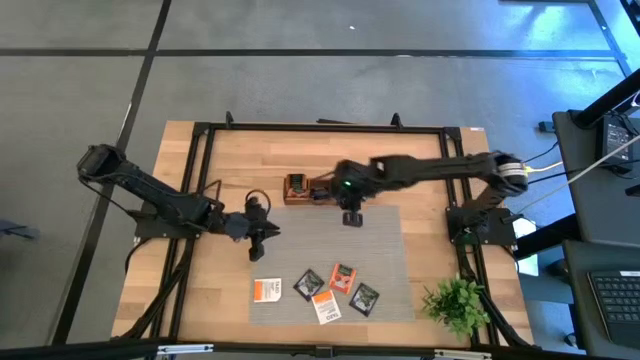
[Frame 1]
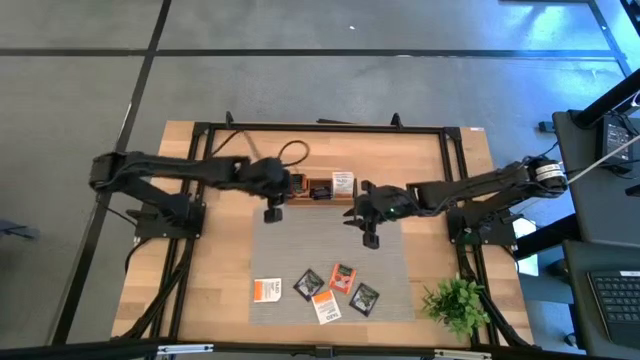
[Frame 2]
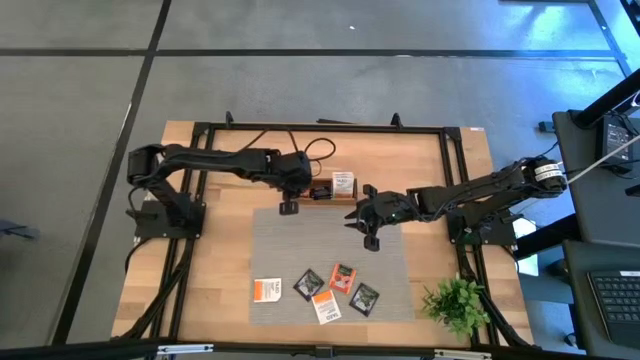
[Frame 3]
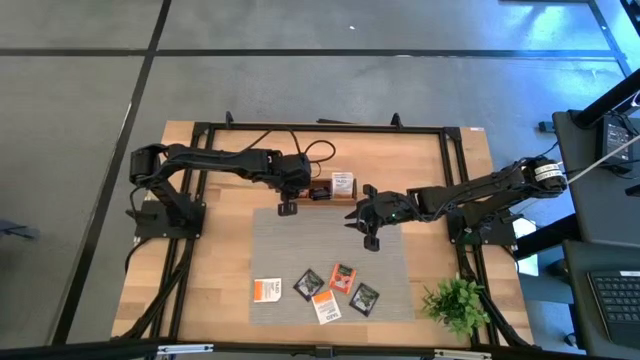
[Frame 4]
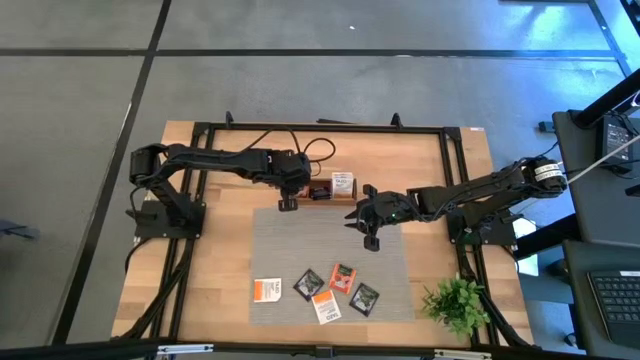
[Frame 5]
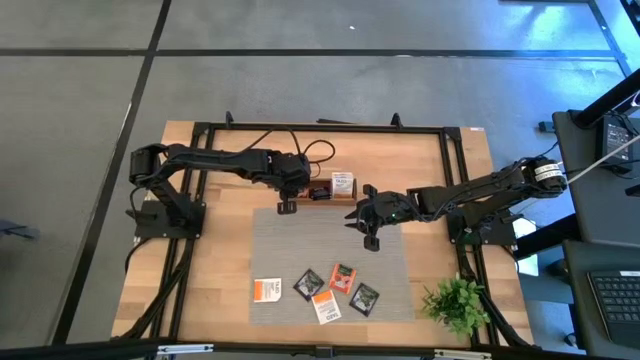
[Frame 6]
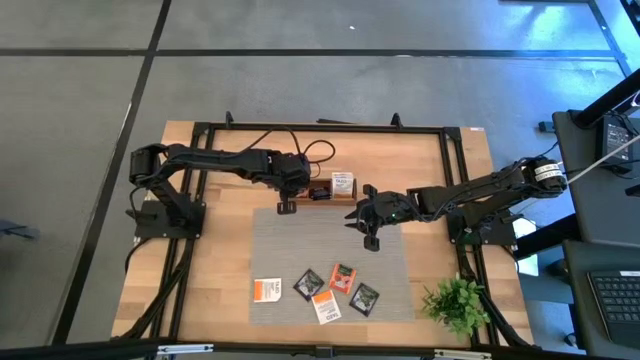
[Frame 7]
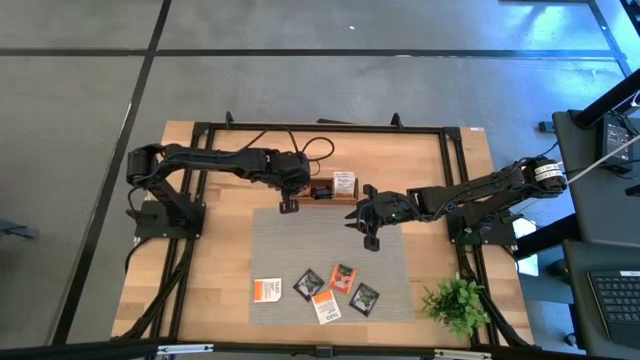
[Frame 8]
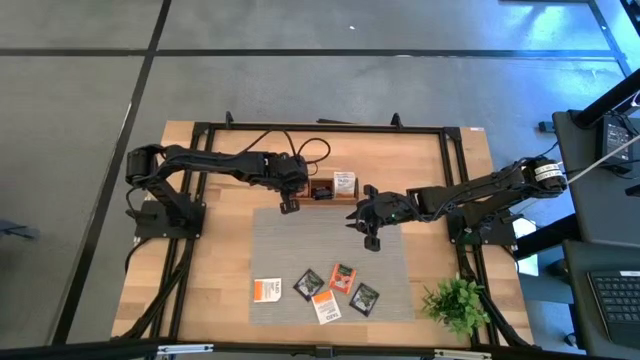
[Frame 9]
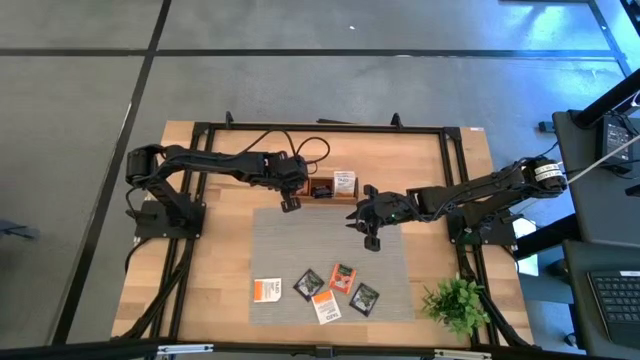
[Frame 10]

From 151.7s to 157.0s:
Task: Pick & Place Tea
Adjust the orange tea bag in the wooden organizer

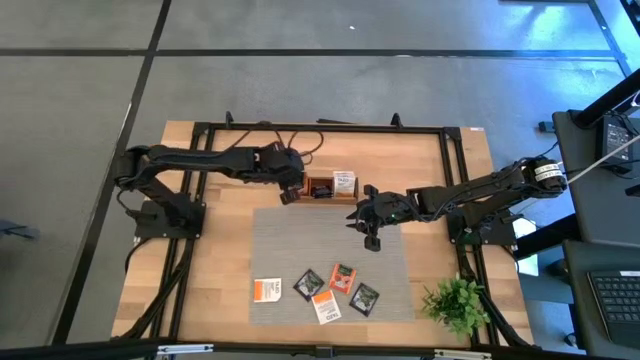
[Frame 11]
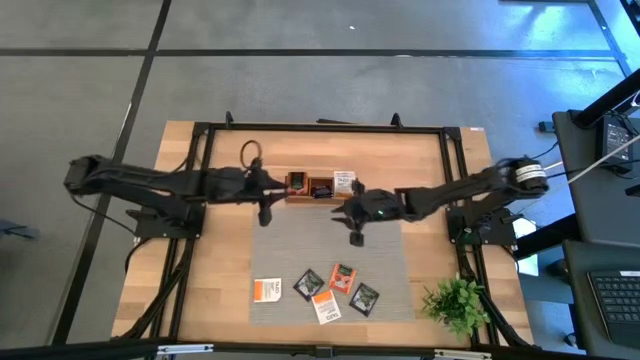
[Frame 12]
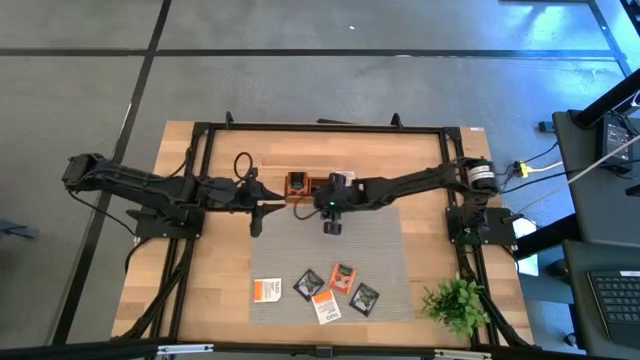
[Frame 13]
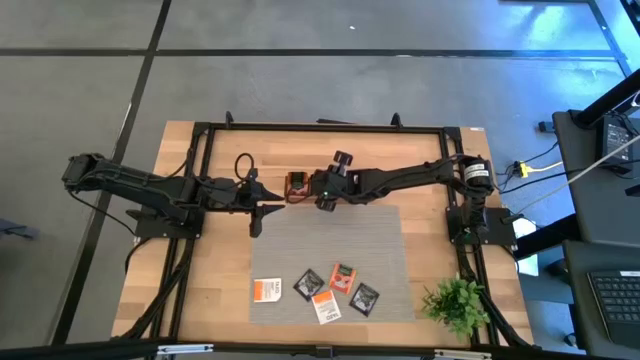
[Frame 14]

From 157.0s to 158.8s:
Adjust the purple tea bags in the wooden organizer

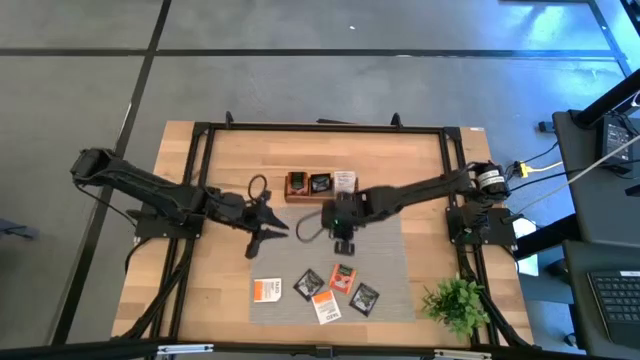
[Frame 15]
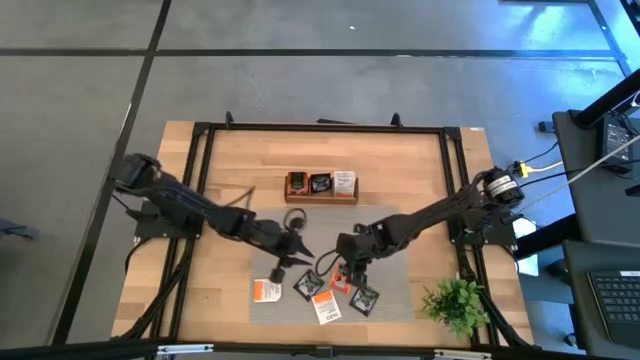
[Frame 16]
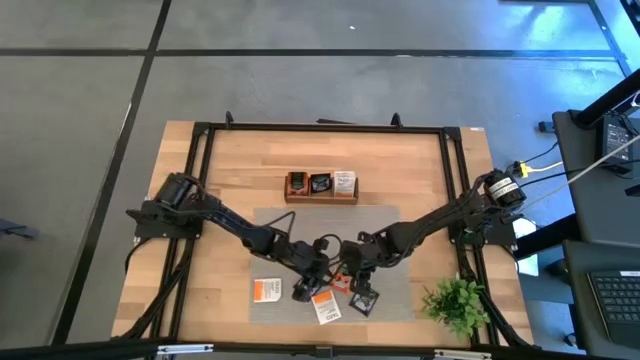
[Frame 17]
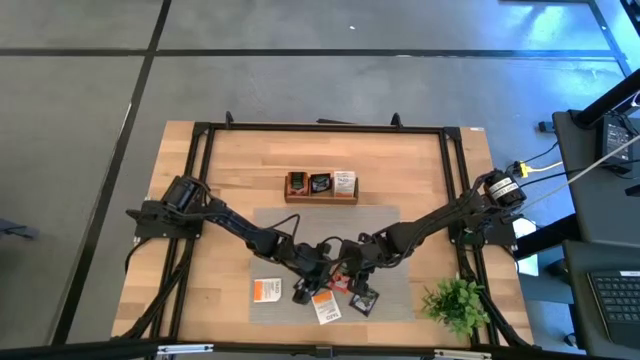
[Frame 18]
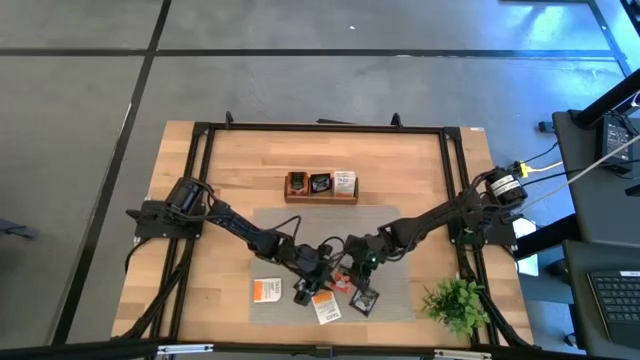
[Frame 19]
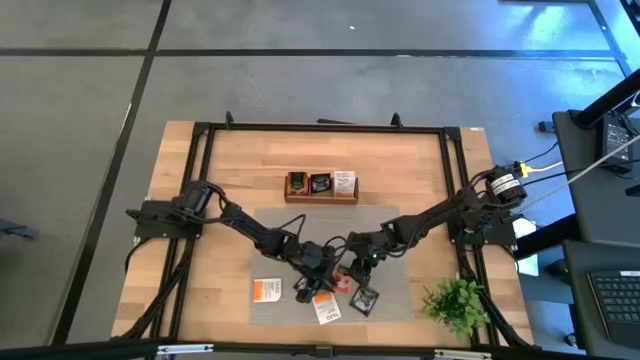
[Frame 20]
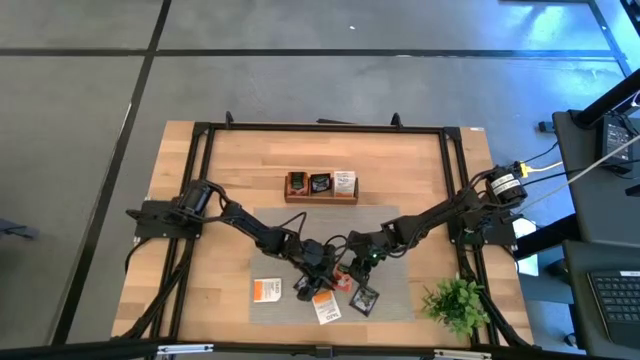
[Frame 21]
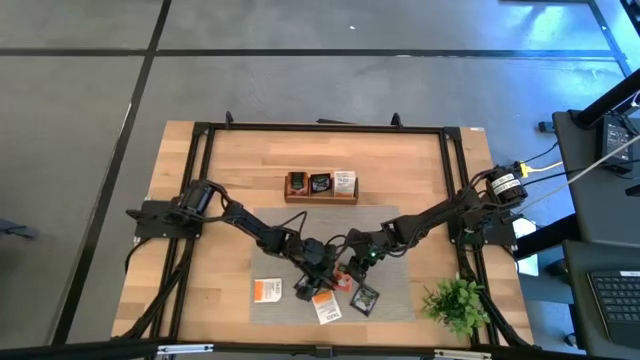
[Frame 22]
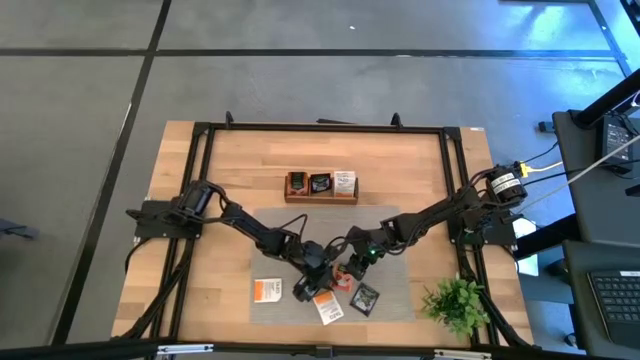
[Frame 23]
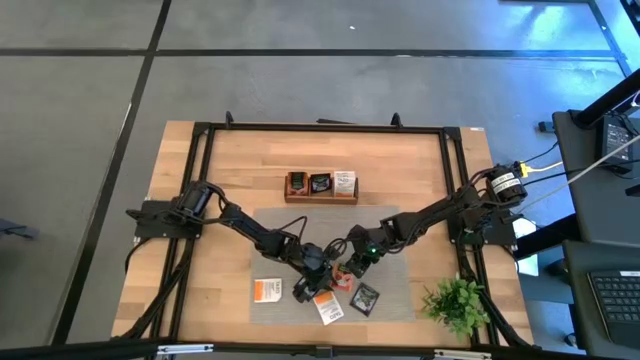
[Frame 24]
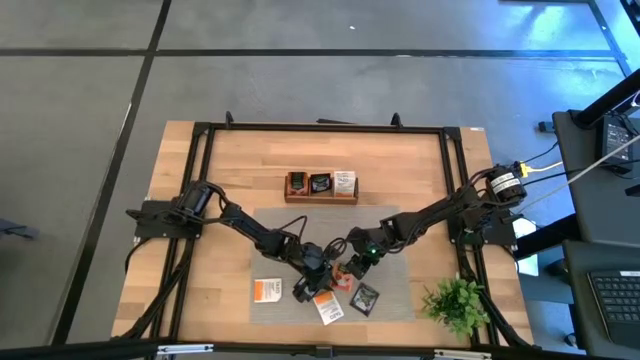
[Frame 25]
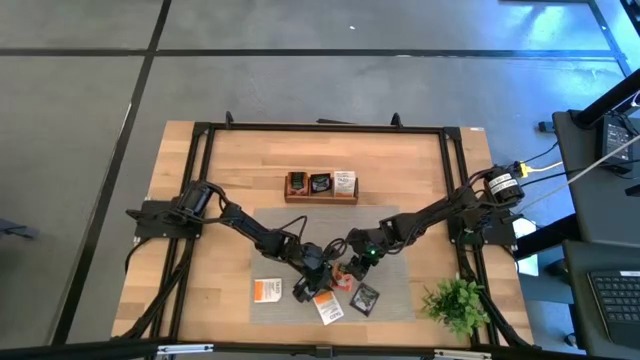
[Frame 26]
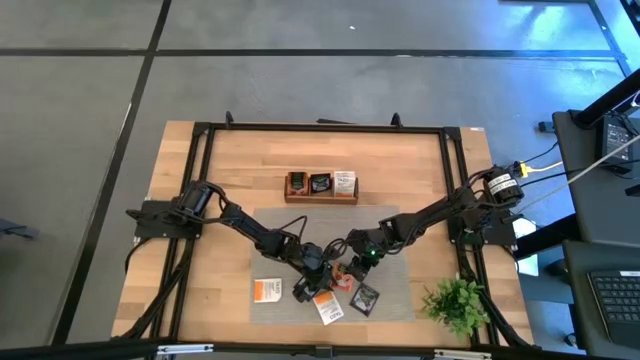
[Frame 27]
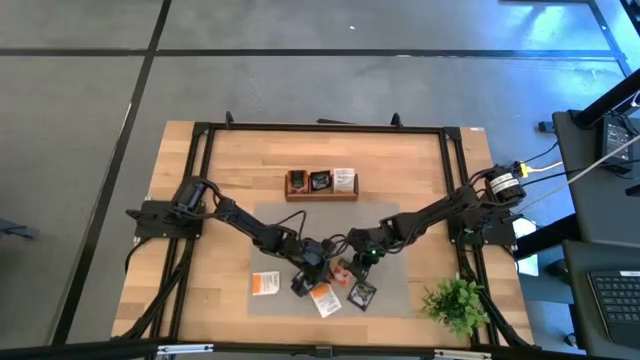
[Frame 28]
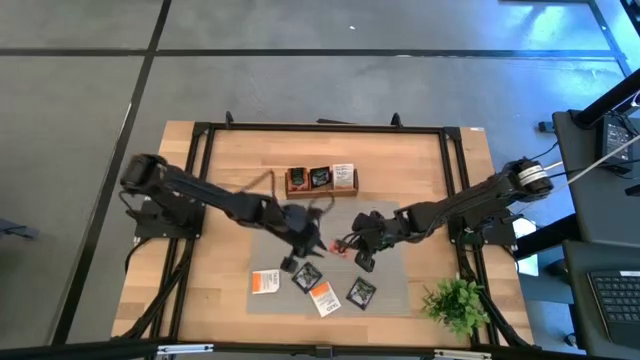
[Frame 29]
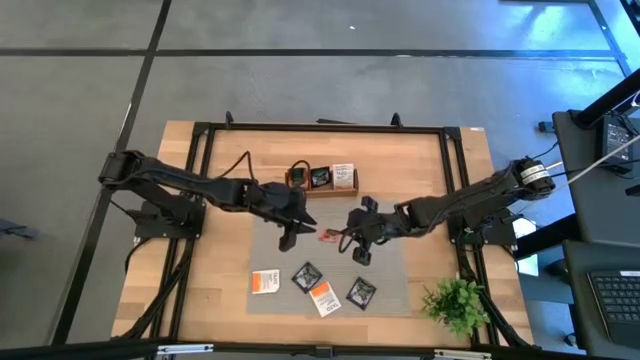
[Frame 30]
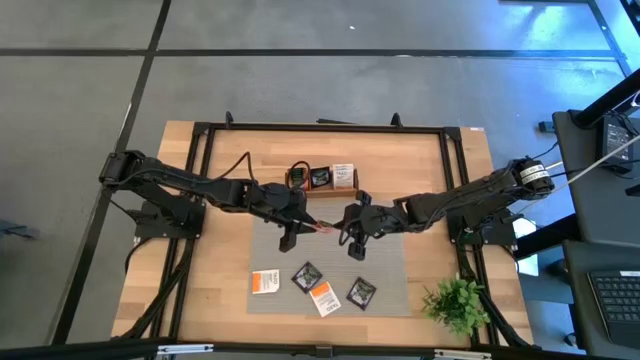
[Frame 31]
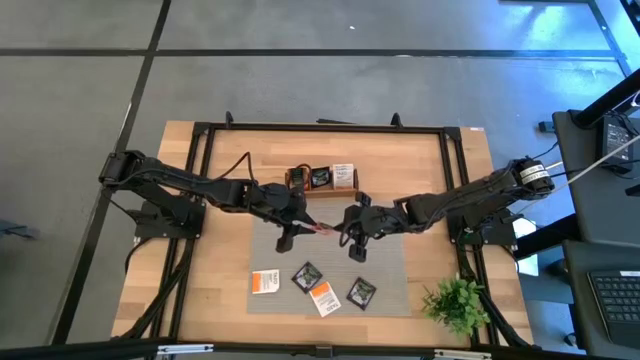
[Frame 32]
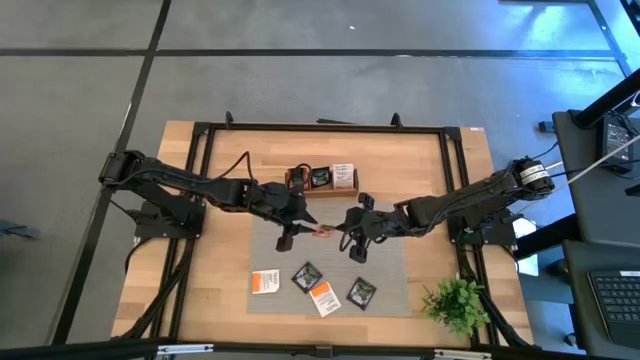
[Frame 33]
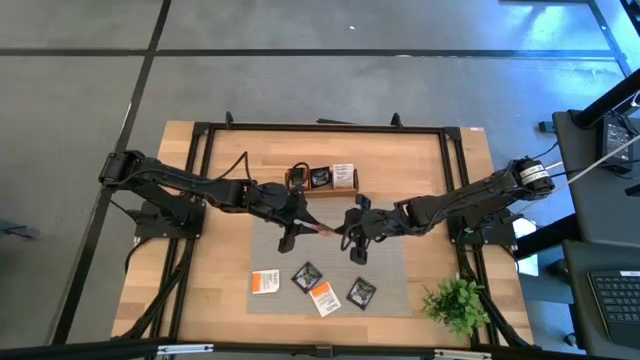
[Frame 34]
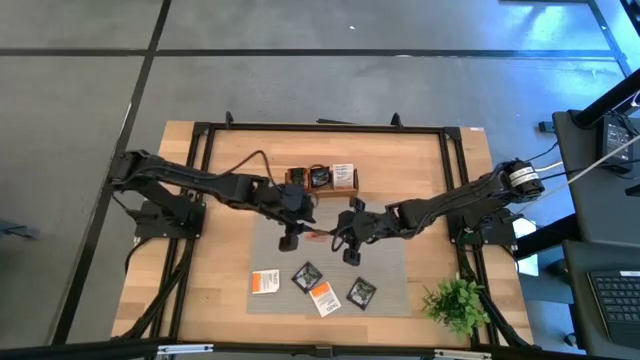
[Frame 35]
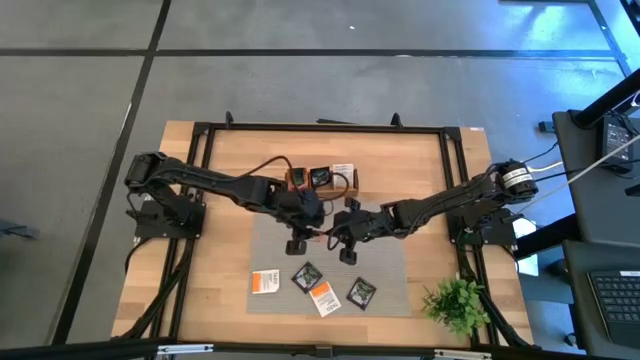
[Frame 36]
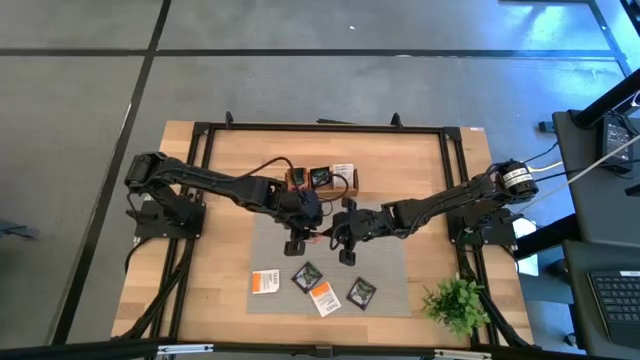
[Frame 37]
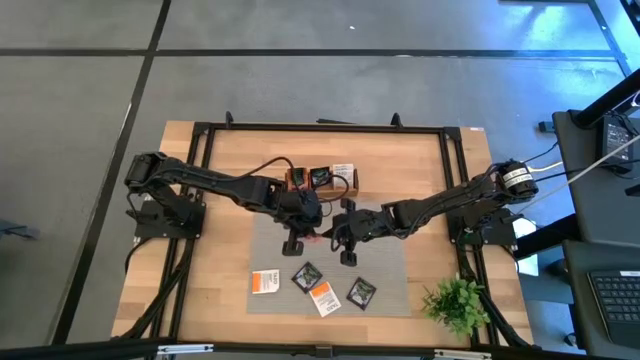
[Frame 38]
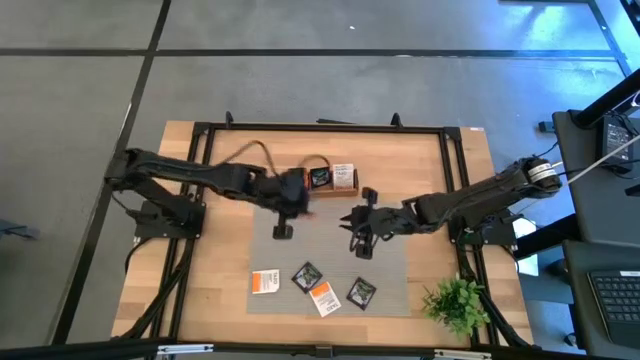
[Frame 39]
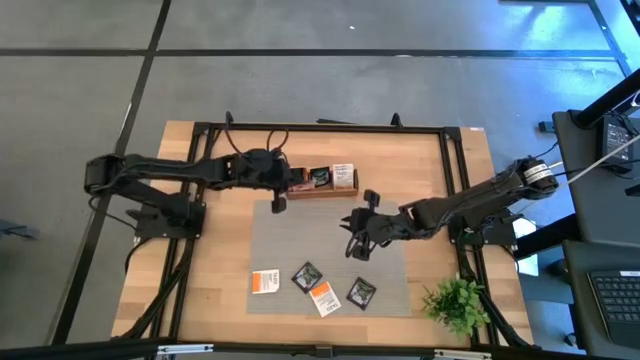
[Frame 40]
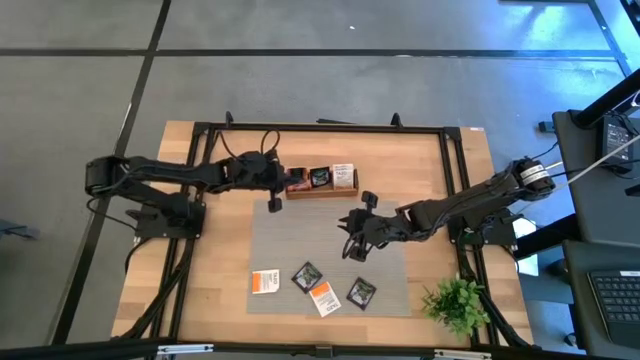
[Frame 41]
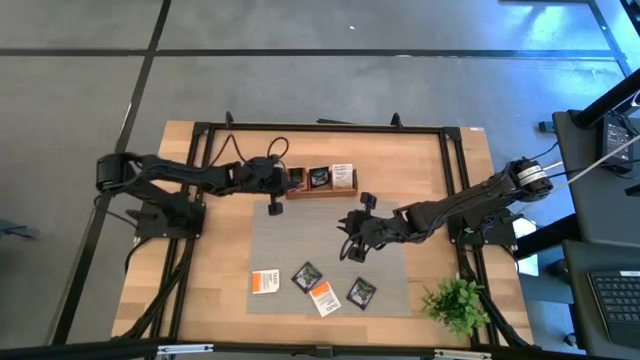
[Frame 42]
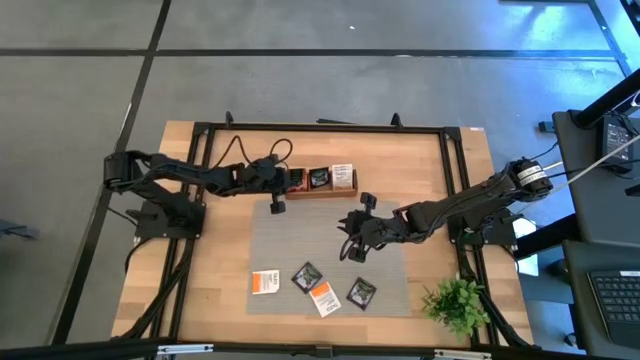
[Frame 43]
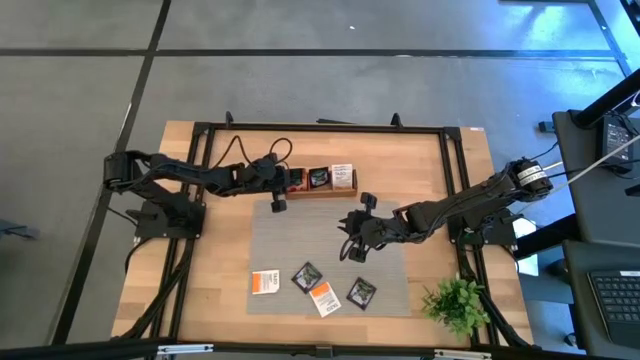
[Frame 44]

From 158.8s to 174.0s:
Put the orange tea bag into the left section of the wooden organizer

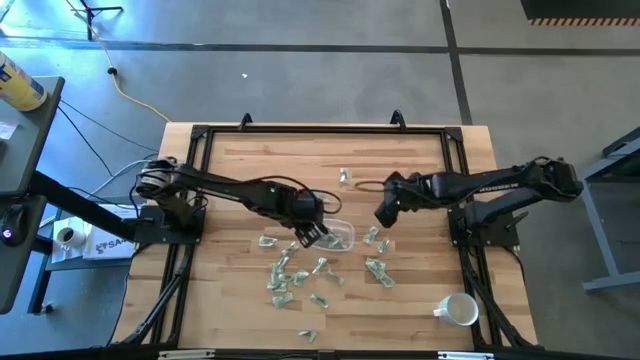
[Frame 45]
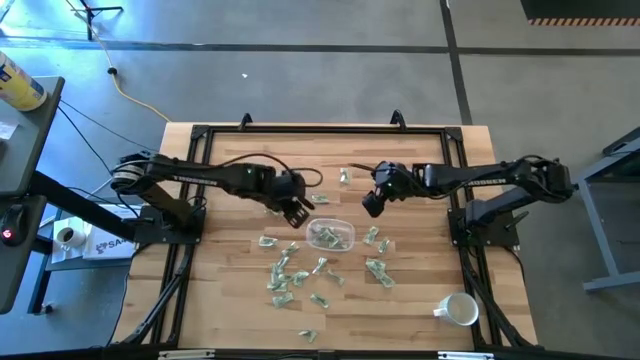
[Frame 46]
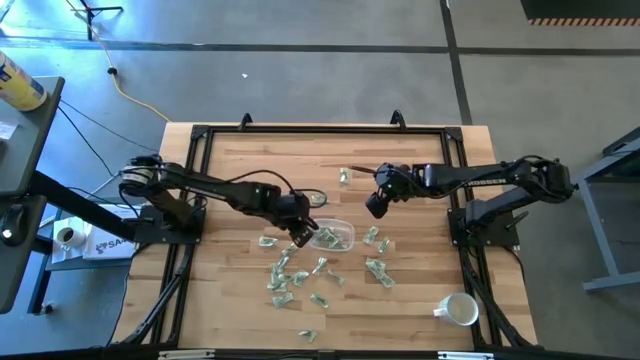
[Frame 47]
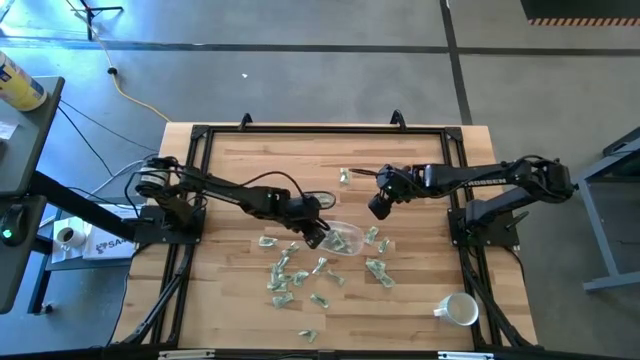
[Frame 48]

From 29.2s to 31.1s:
Task: Pick and place Stevia / Truvia into bins
Adjust the transparent container
